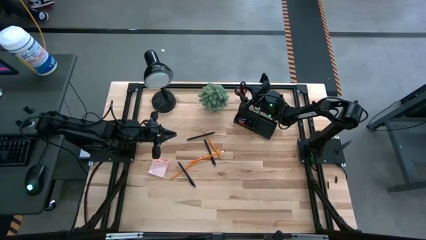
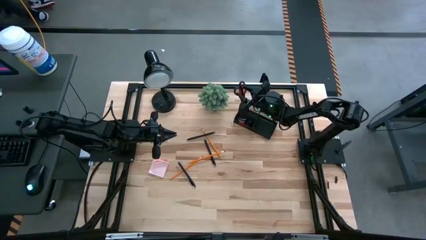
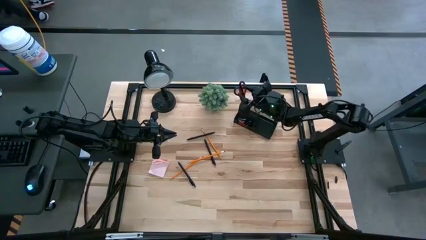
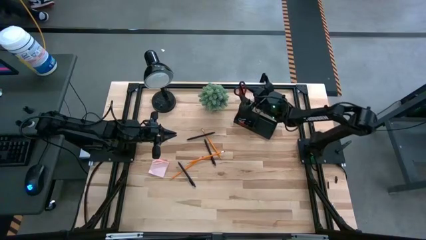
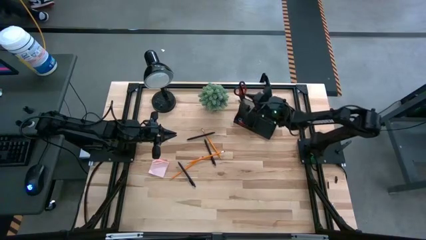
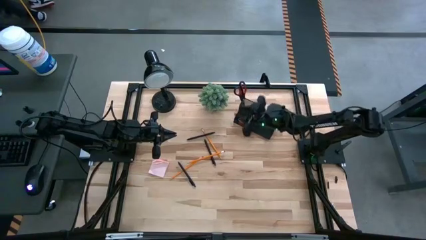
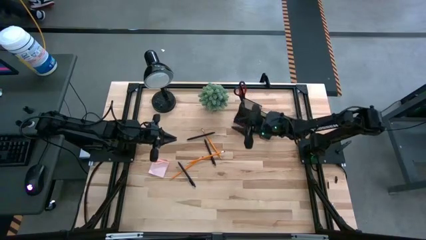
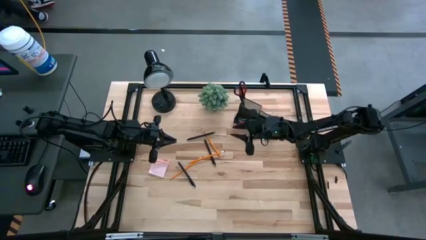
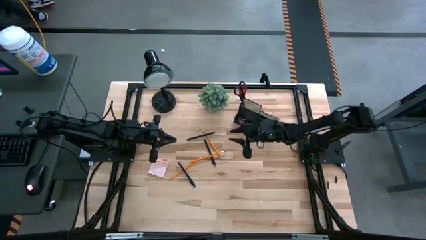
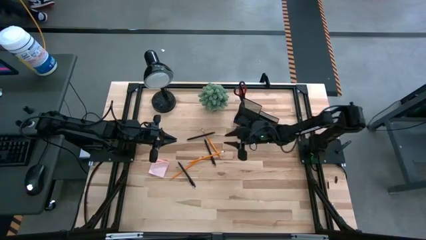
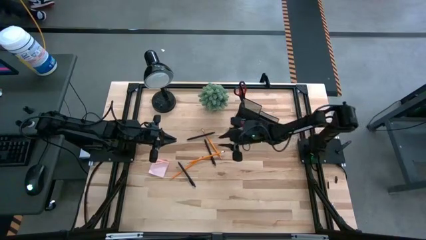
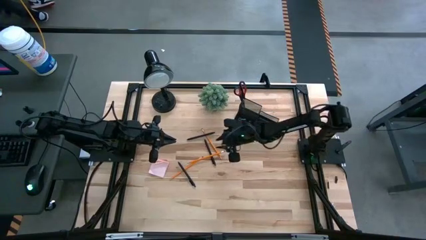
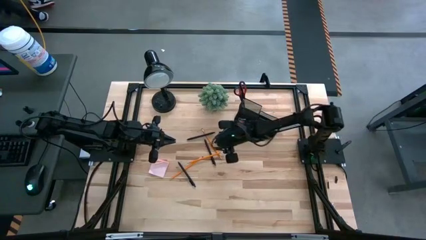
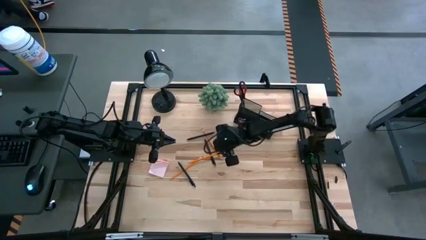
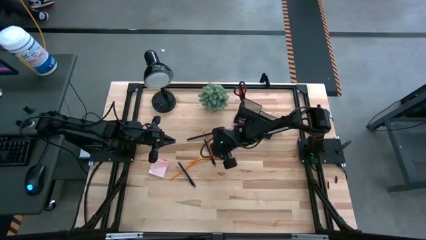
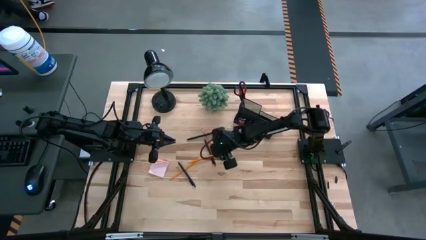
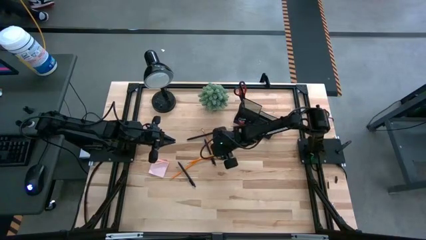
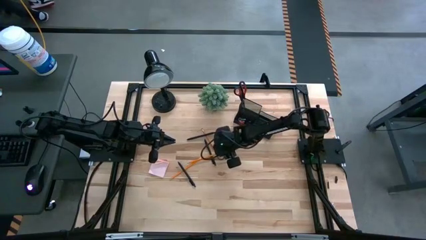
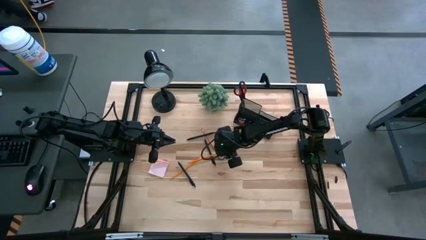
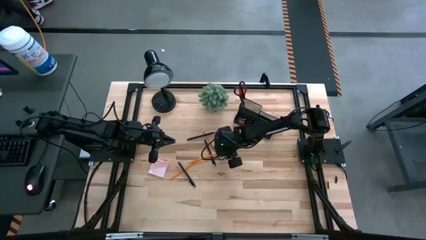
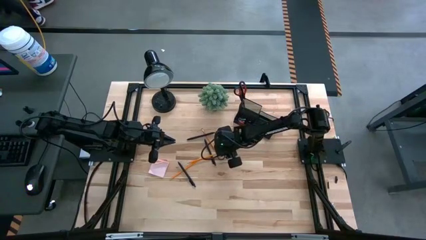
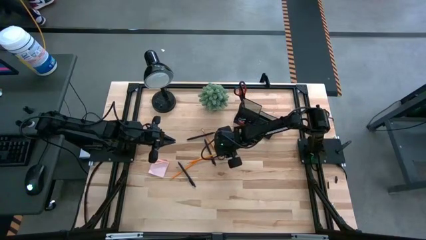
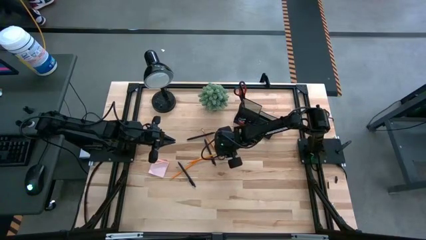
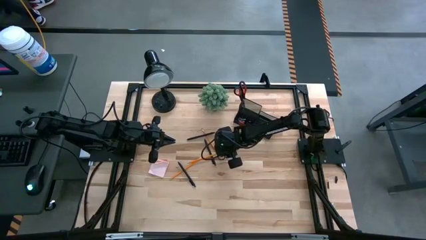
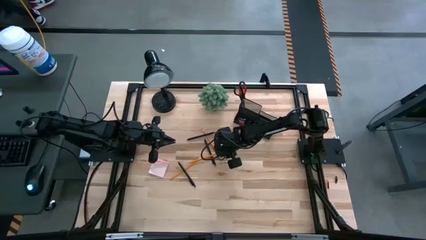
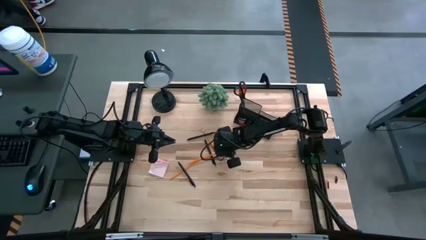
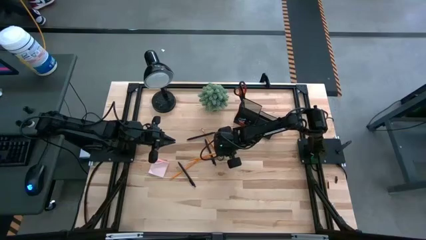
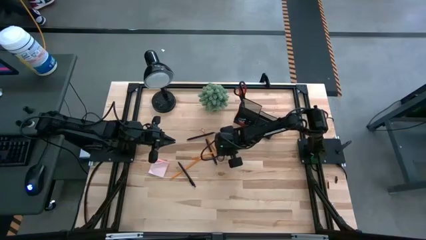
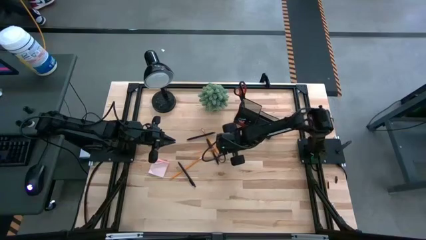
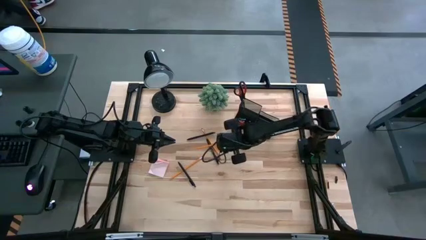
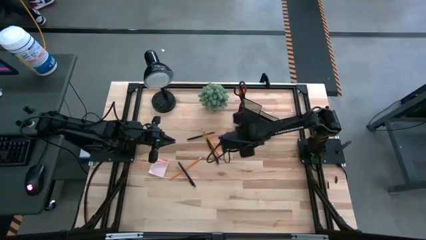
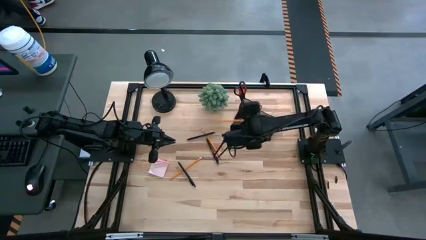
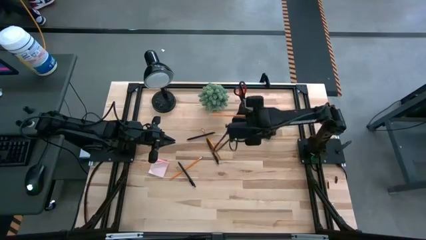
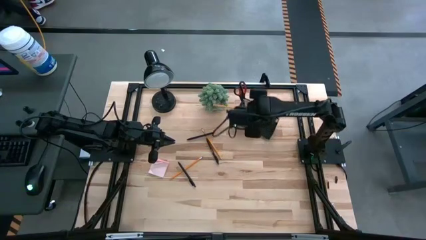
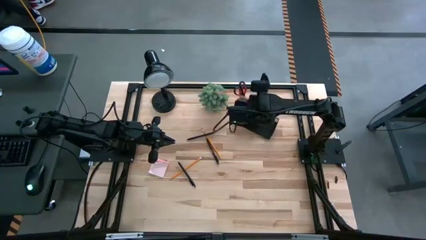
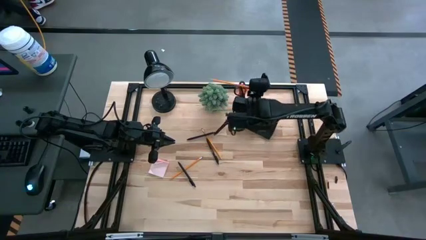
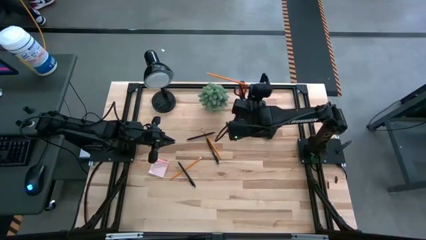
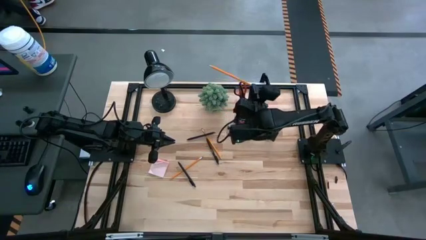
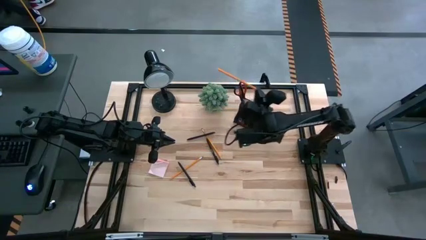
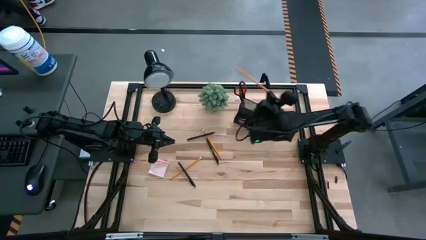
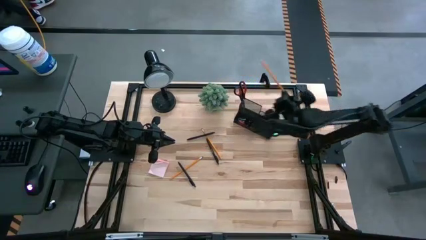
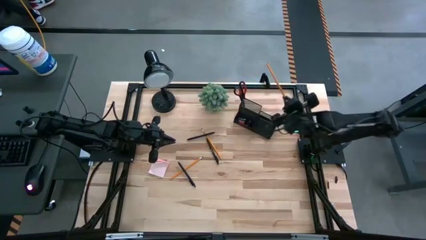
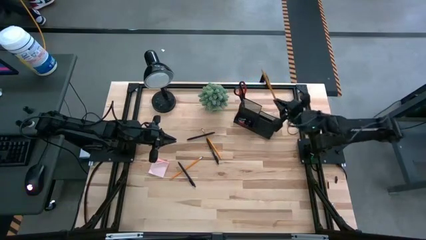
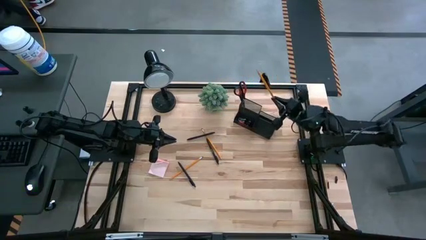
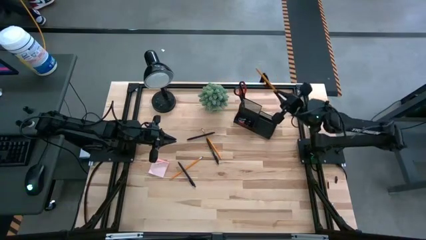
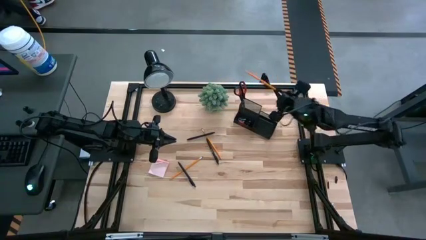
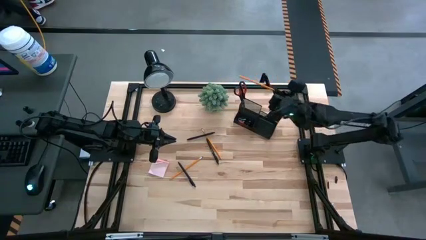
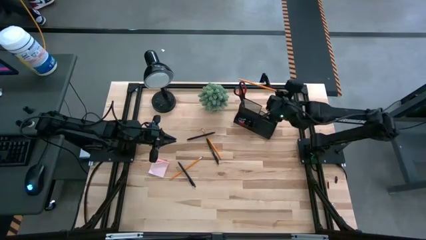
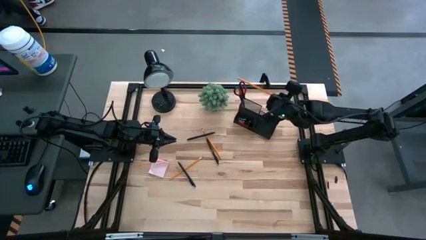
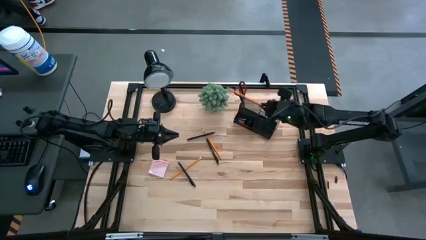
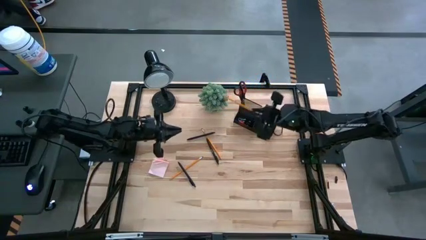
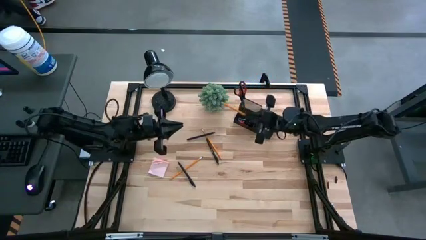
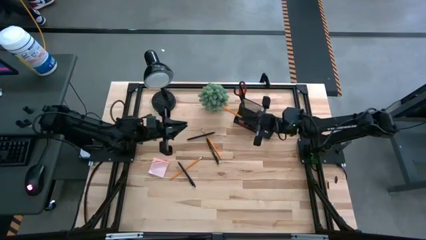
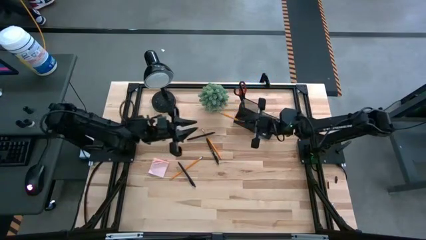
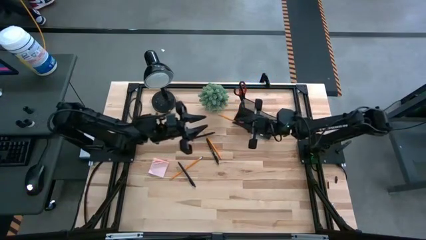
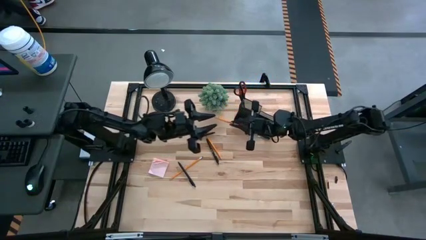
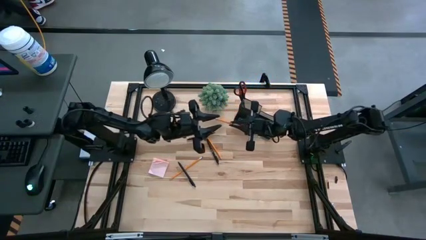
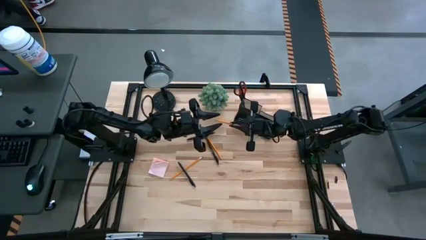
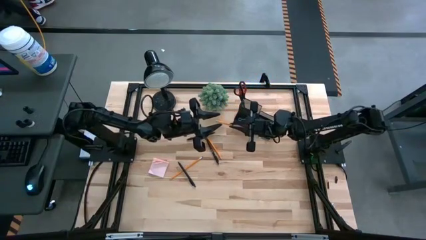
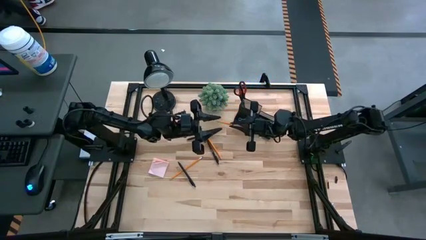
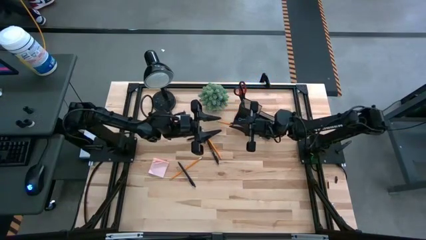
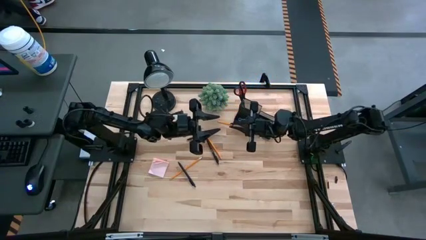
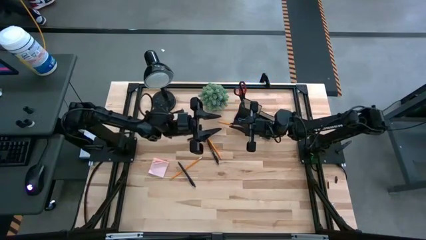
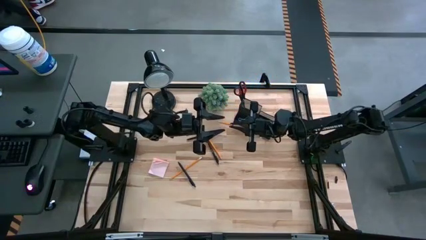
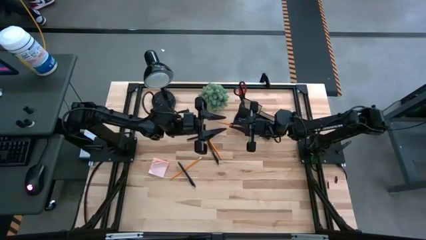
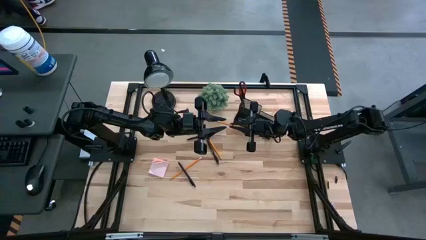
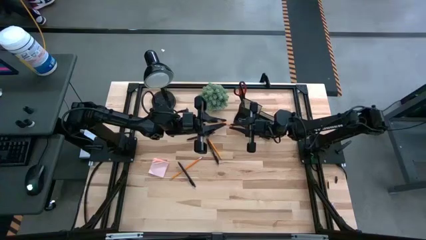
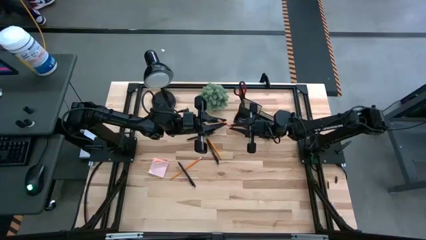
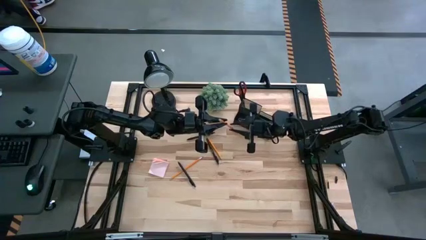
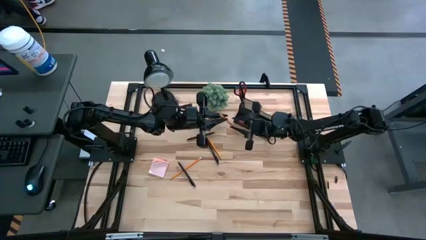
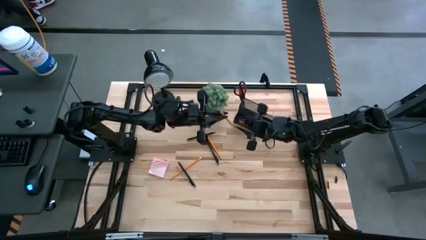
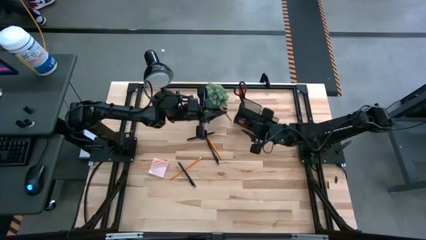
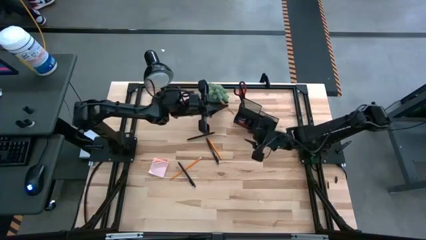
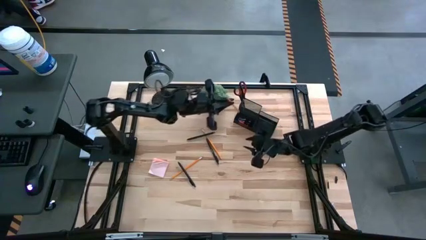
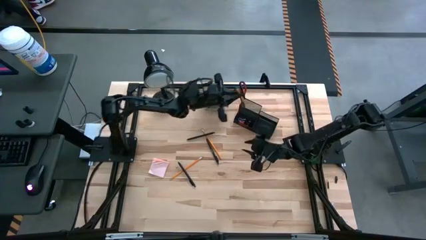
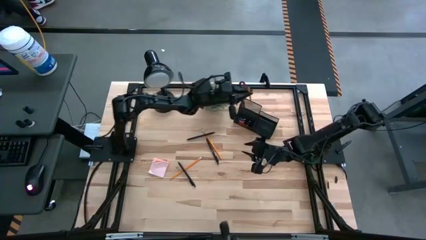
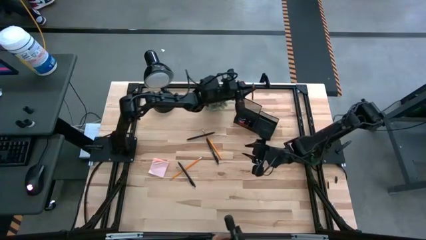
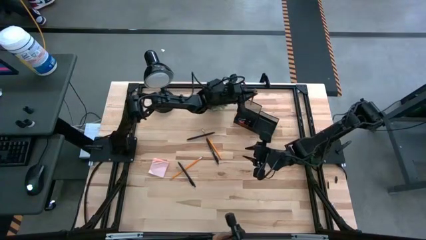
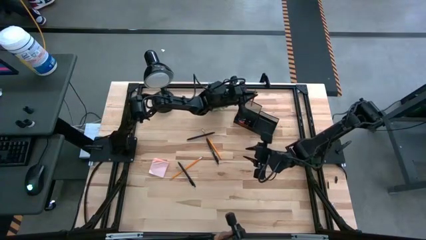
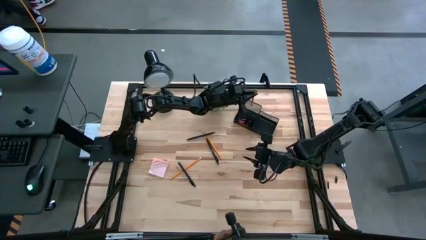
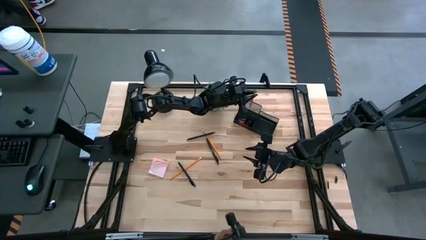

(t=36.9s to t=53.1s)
Task: Pick and place office supplies into organizer
Put the middle orange pencil into the black desk organizer
